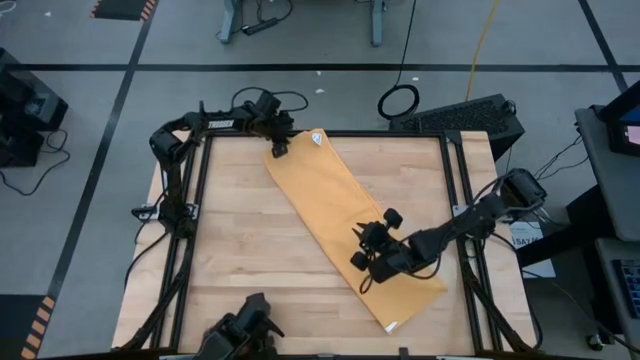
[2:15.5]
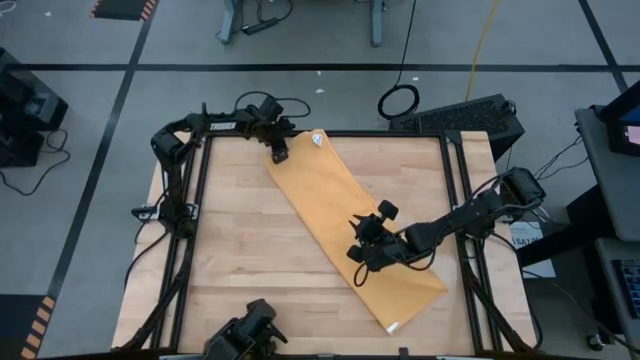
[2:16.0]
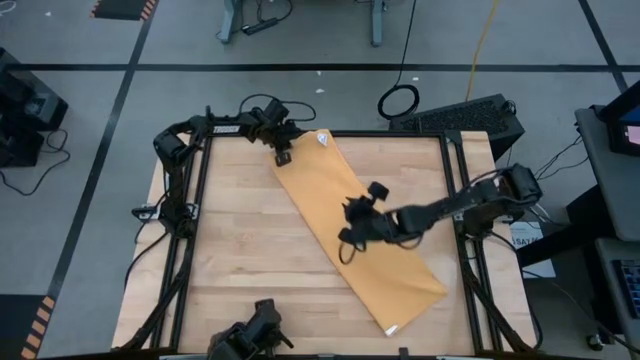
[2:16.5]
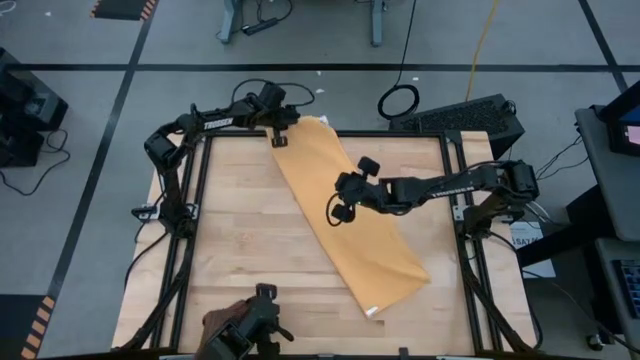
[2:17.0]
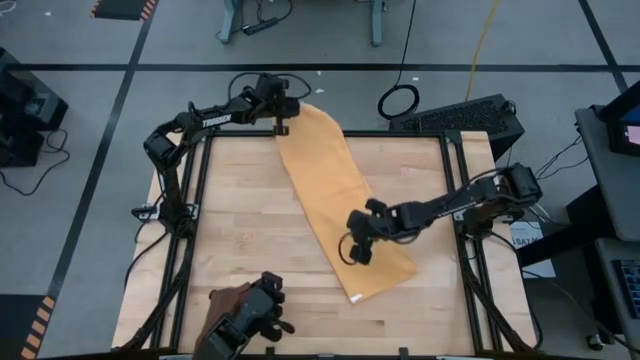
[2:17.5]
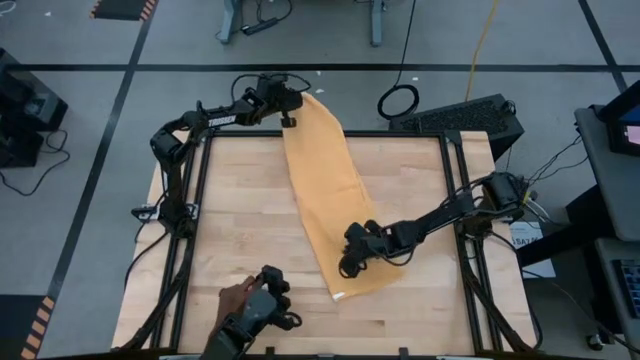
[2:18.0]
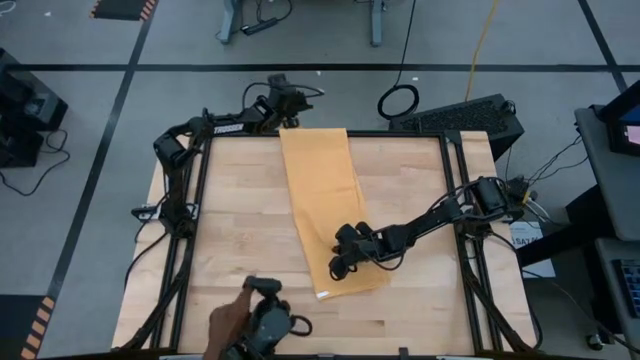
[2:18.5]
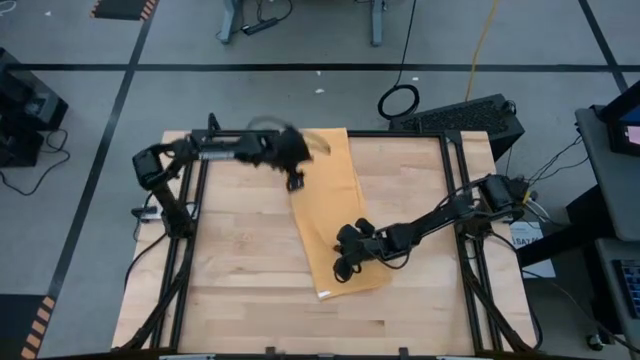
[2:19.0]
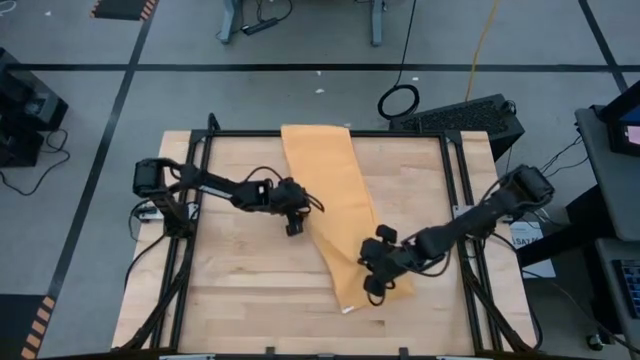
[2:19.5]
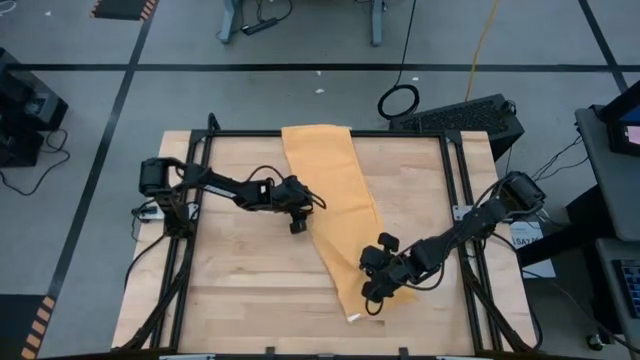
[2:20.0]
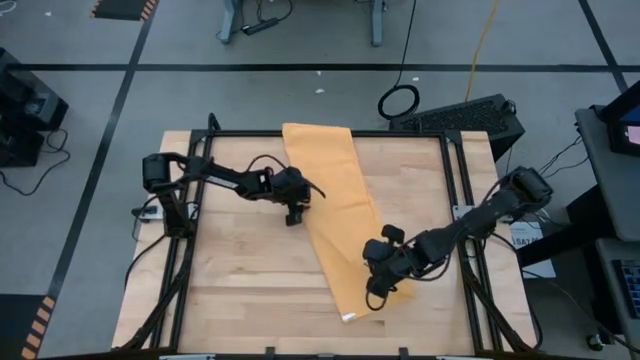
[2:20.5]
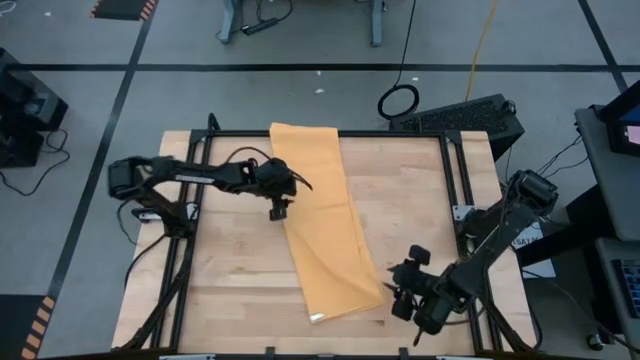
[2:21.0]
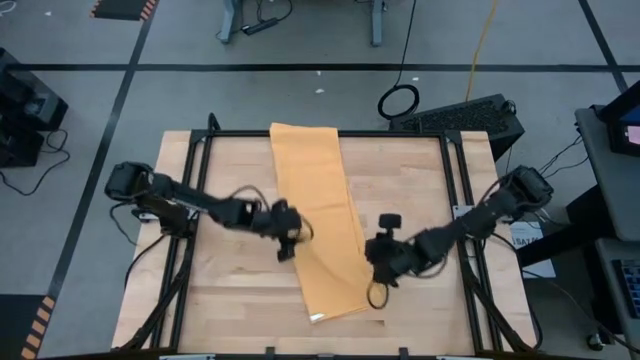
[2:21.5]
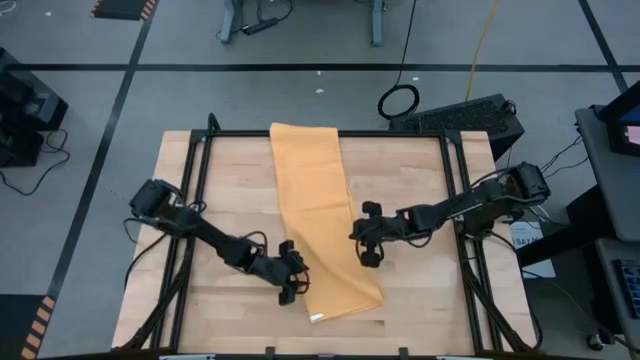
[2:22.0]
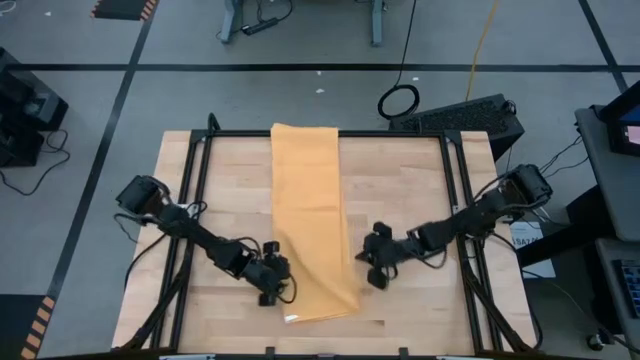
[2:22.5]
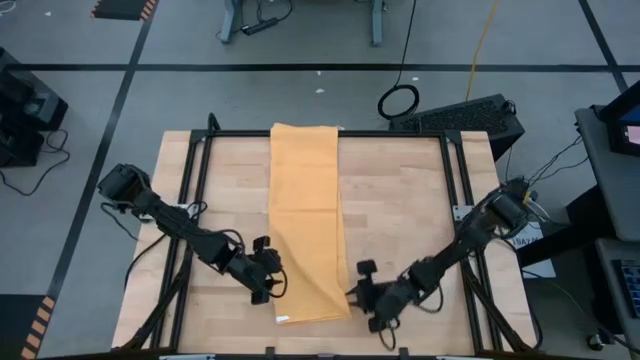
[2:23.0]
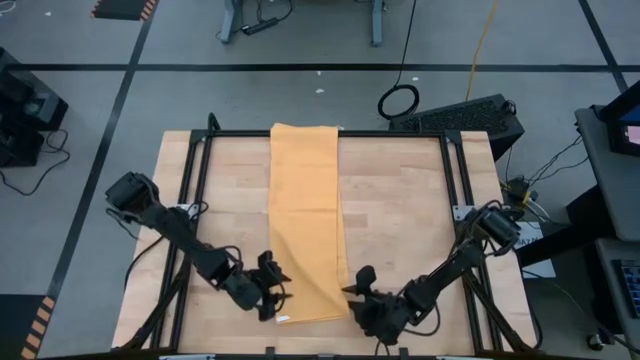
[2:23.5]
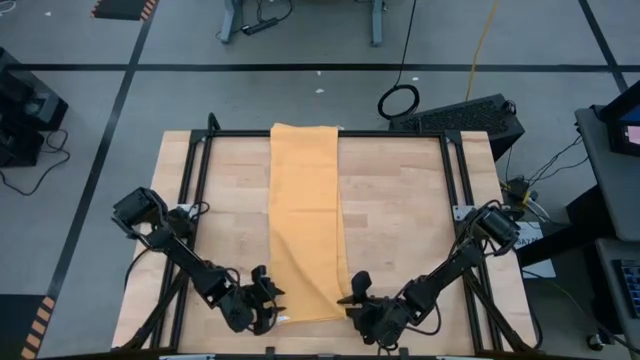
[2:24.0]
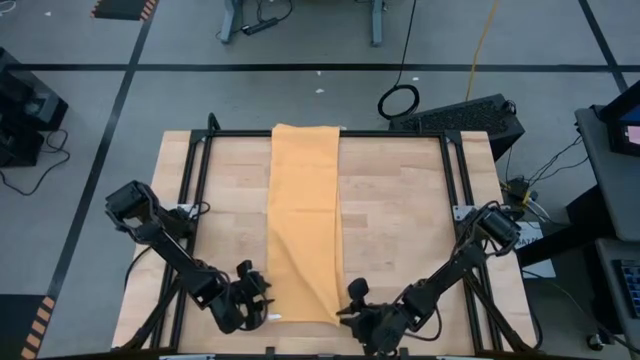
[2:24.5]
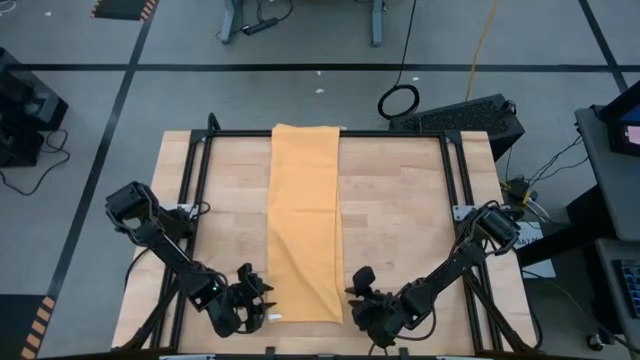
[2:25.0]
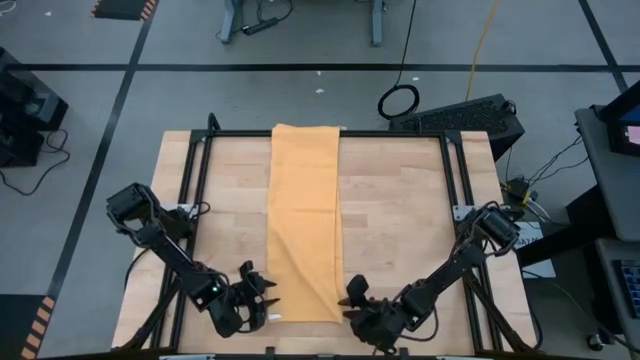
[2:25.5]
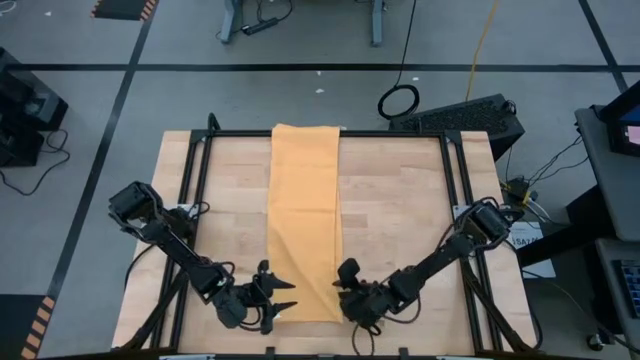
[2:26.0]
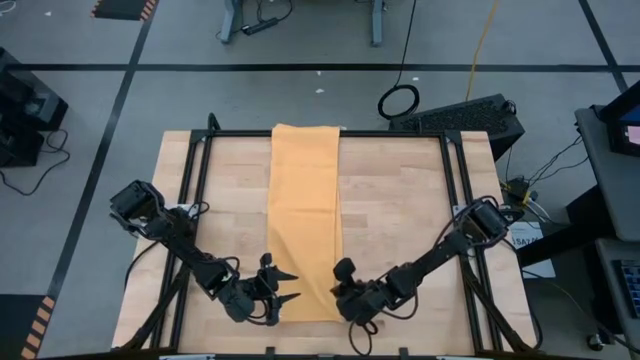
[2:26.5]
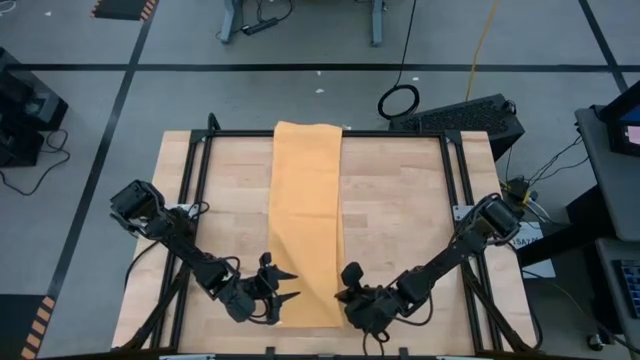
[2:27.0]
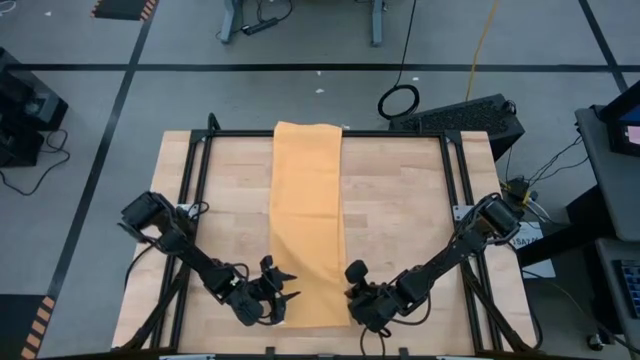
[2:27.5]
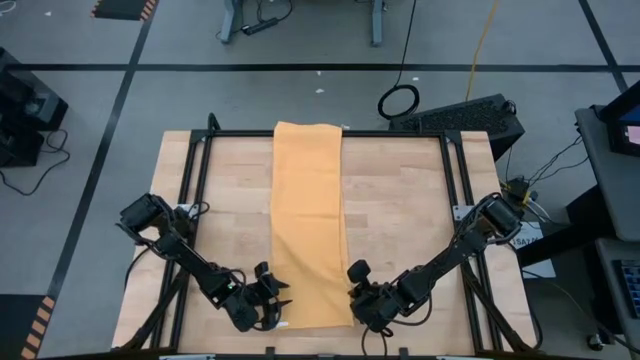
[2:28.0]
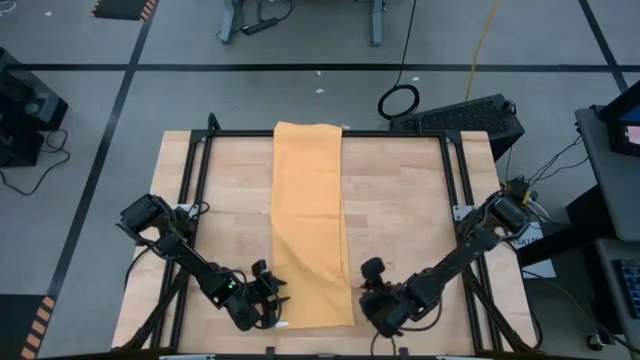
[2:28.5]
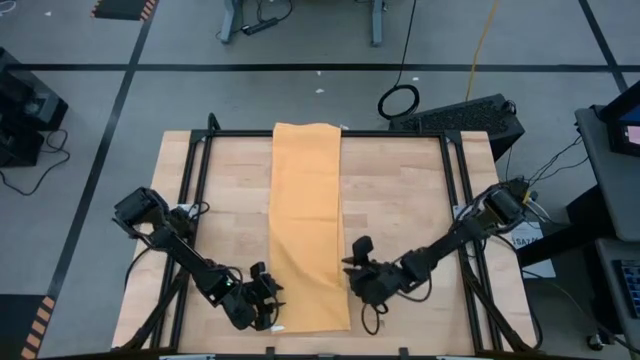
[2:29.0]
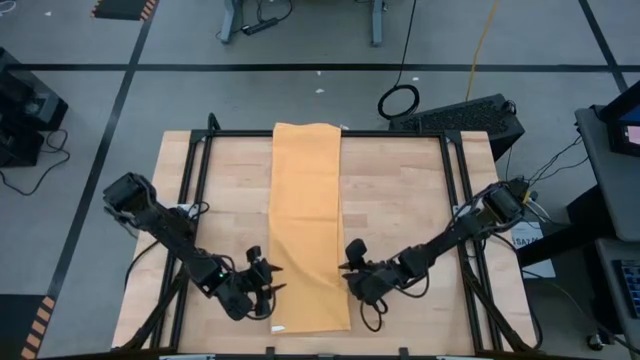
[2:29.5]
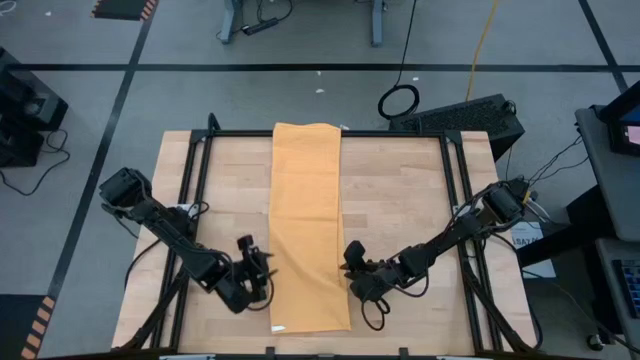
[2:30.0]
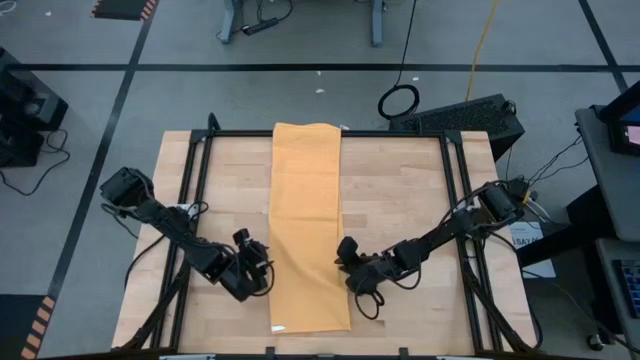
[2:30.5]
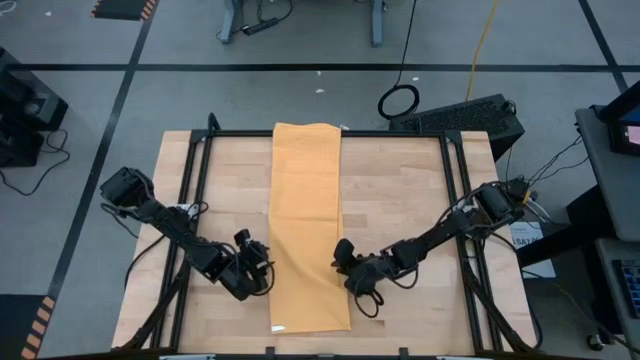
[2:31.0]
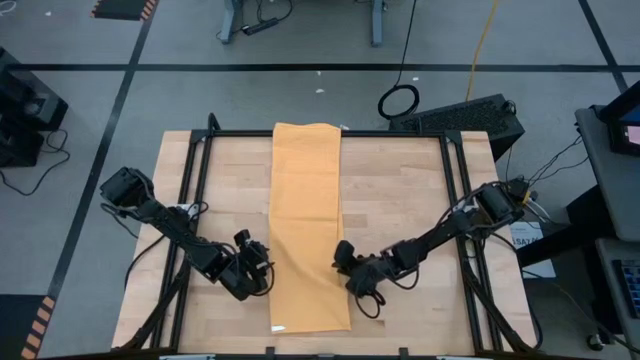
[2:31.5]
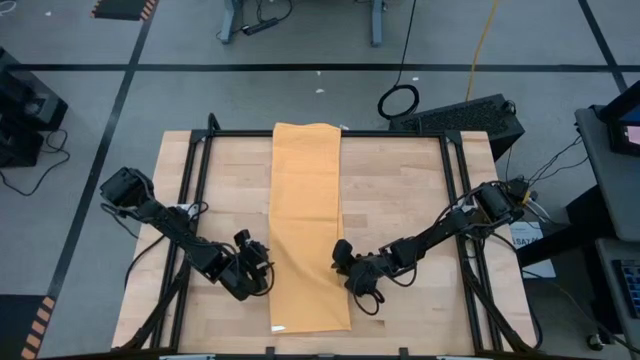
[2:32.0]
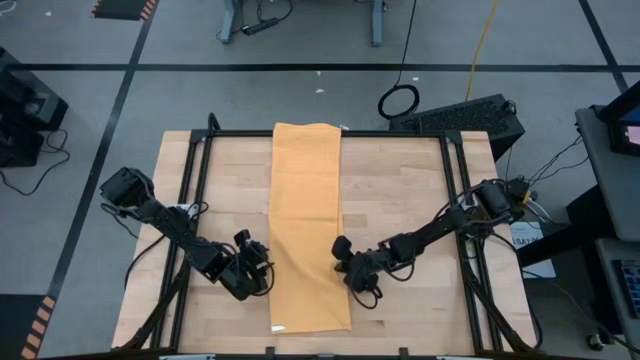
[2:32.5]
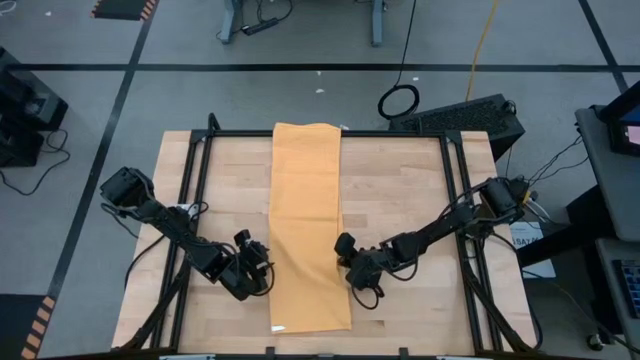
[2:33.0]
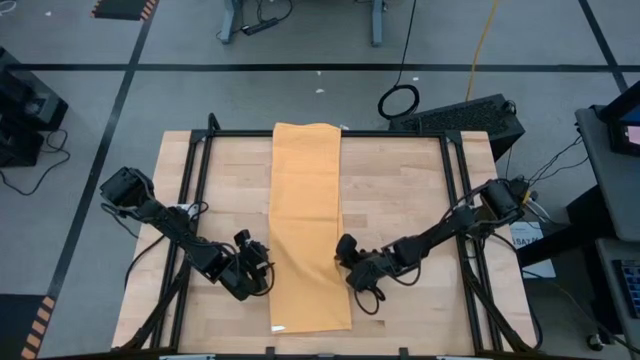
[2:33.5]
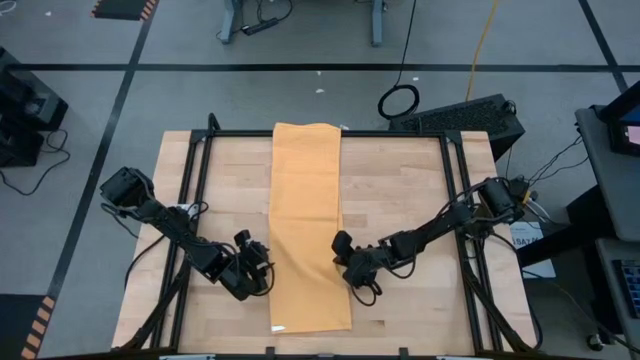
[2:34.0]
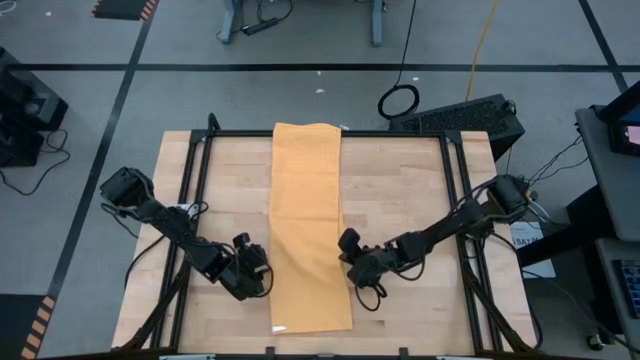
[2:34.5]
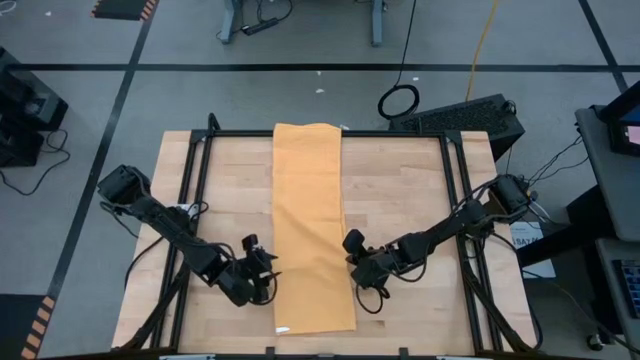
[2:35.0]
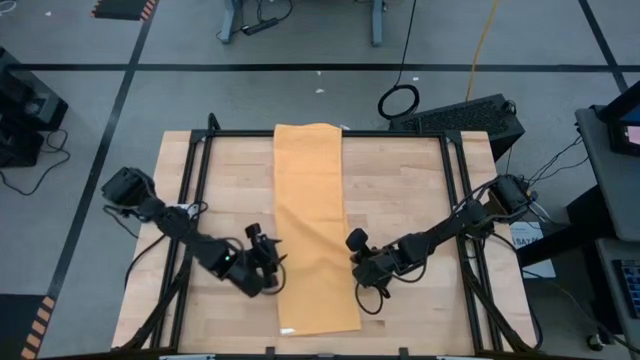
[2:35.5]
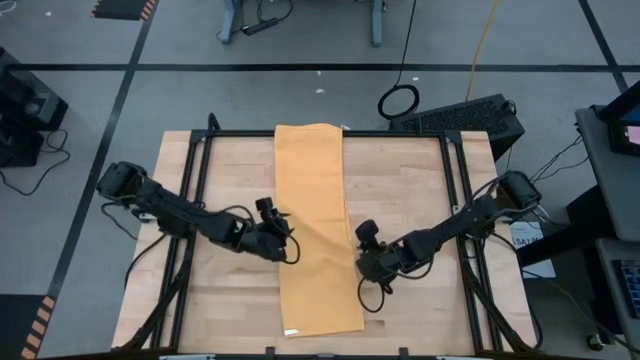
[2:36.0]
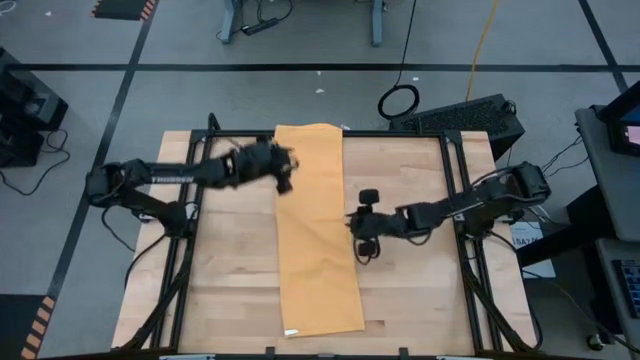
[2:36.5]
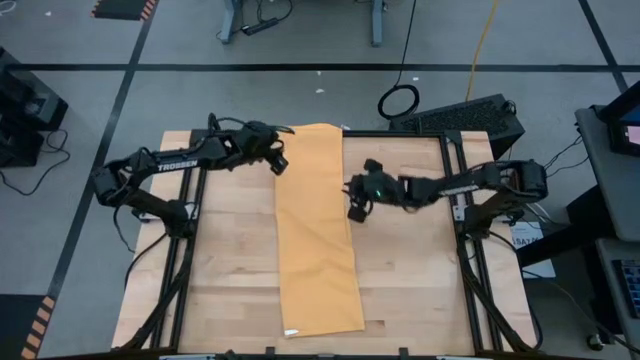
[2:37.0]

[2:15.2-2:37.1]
Task: Roll towel
Fold the yellow towel
